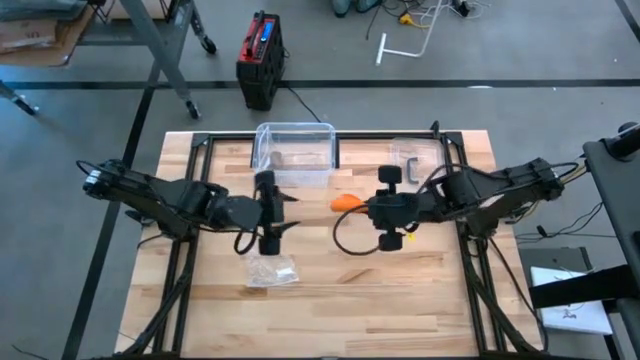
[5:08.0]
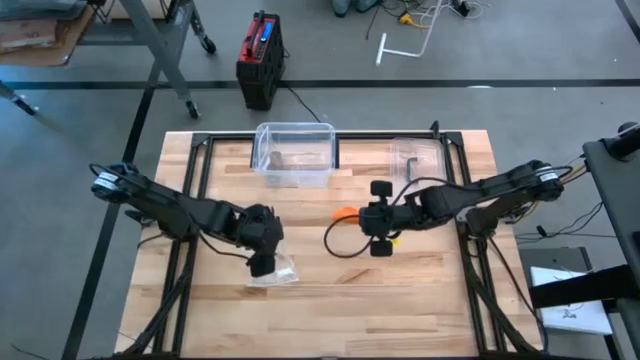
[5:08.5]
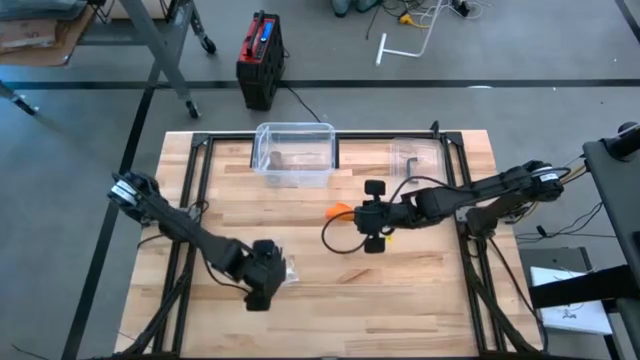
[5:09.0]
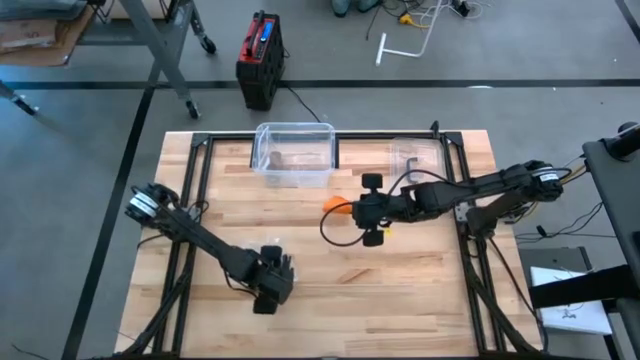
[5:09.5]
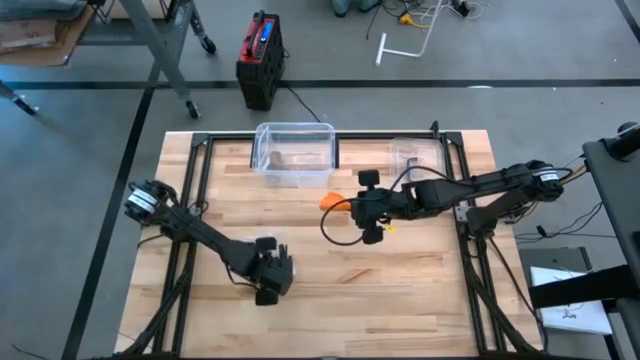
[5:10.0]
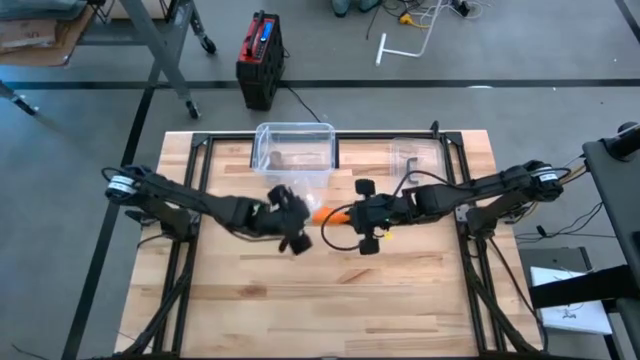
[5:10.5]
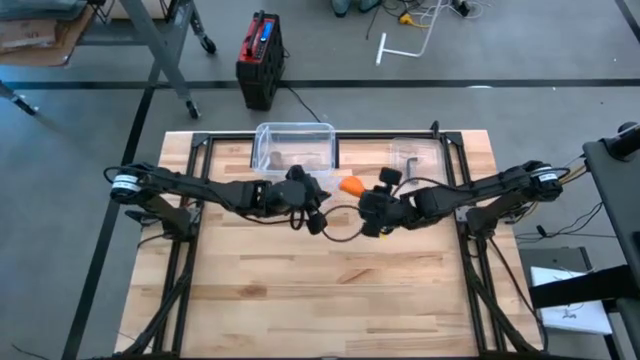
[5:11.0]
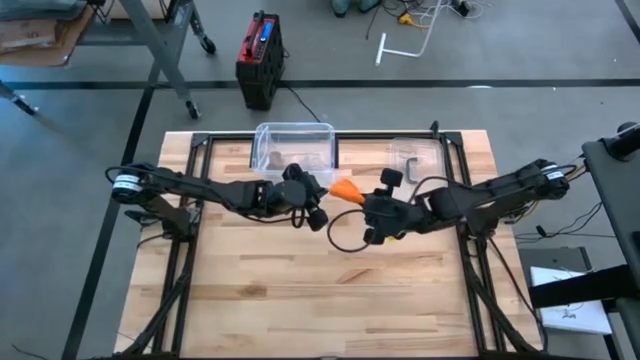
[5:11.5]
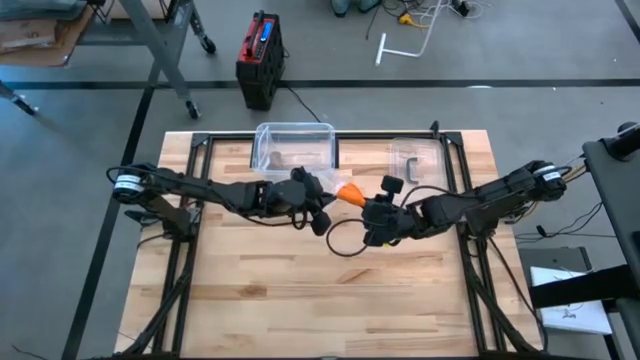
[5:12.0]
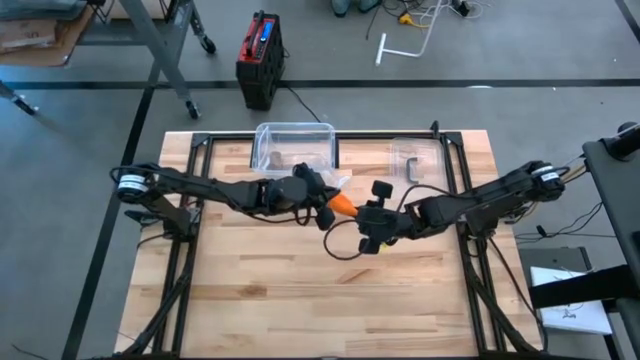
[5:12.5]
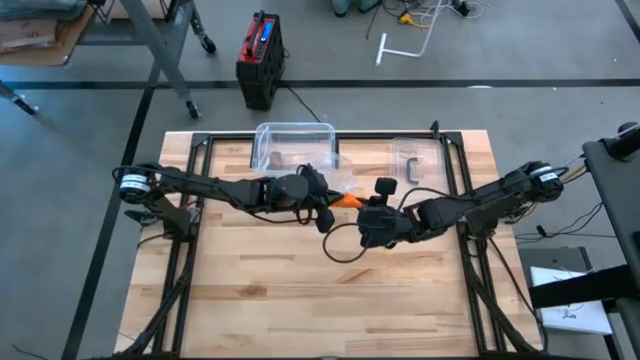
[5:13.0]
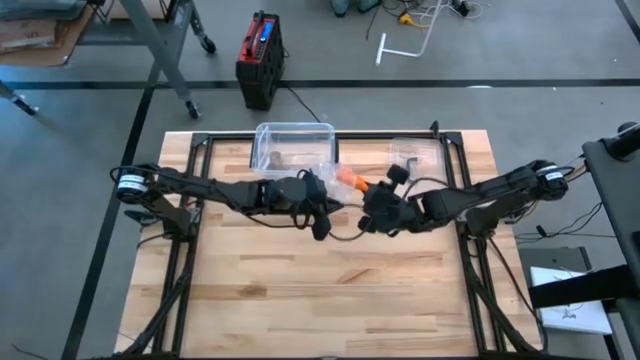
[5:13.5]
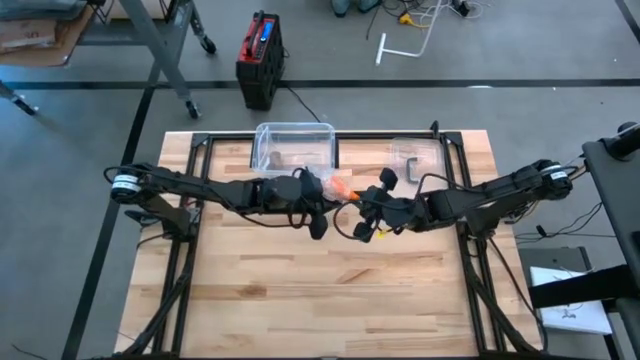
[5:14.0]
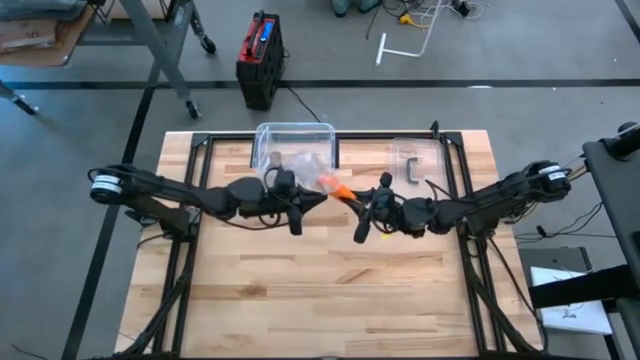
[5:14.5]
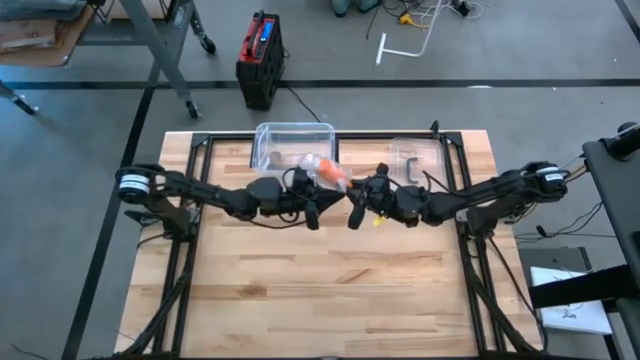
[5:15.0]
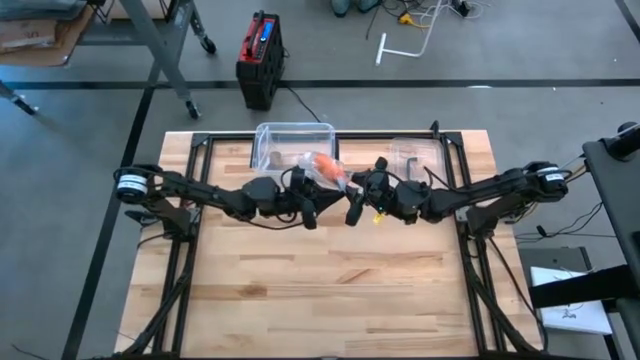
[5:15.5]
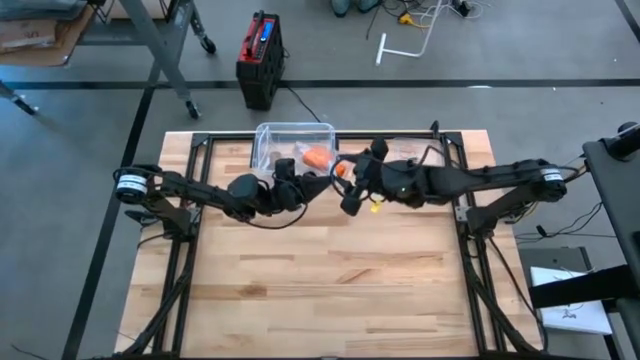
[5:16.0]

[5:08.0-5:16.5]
Task: Roll bandage
Put the orange bandage into the transparent zip bag

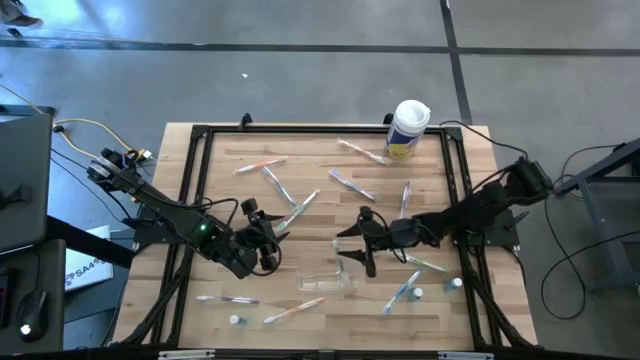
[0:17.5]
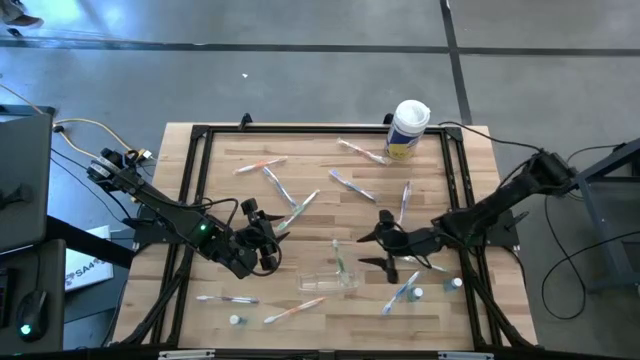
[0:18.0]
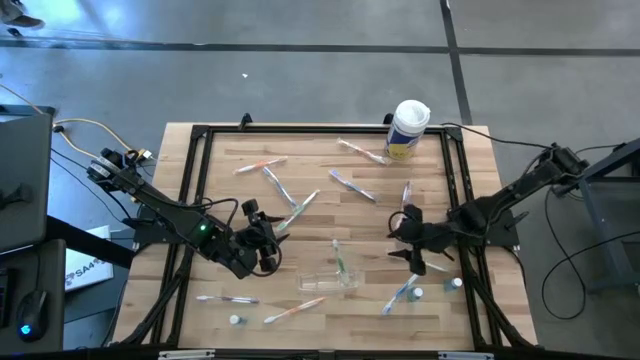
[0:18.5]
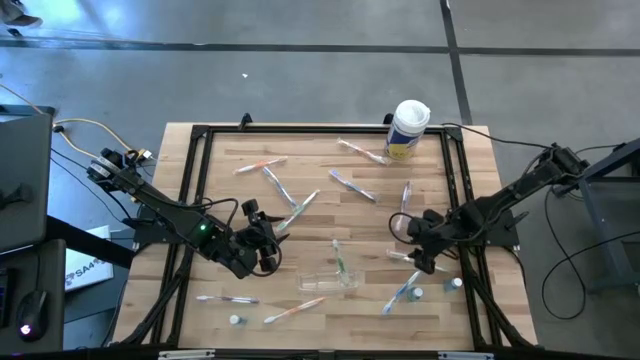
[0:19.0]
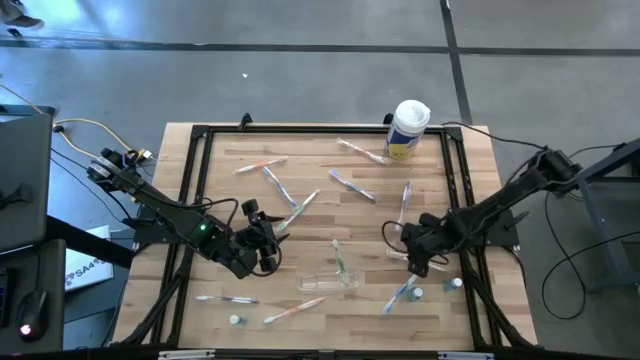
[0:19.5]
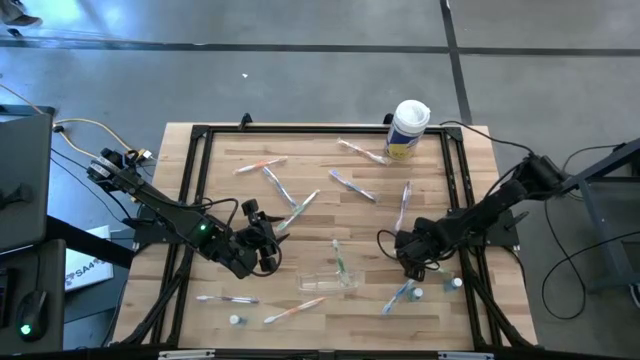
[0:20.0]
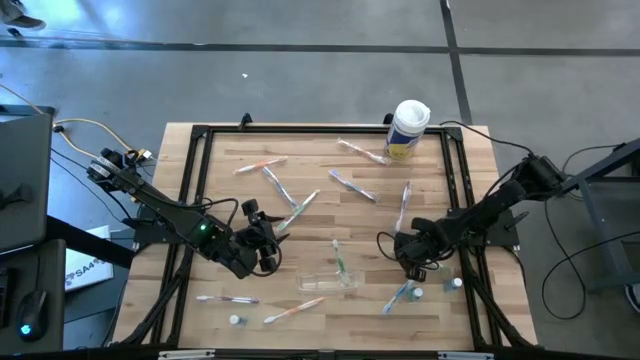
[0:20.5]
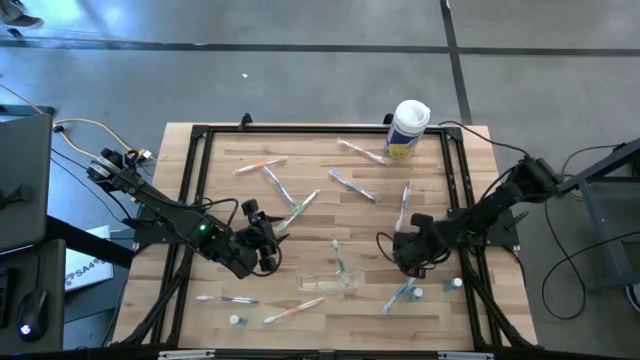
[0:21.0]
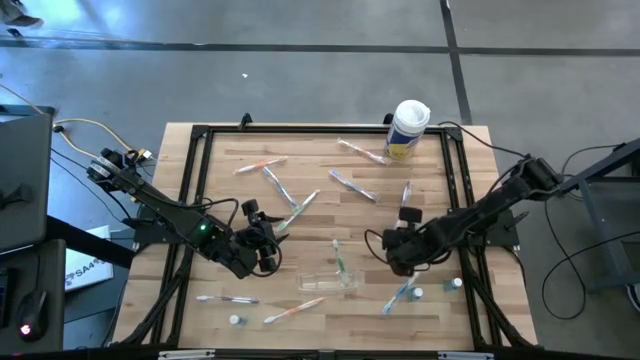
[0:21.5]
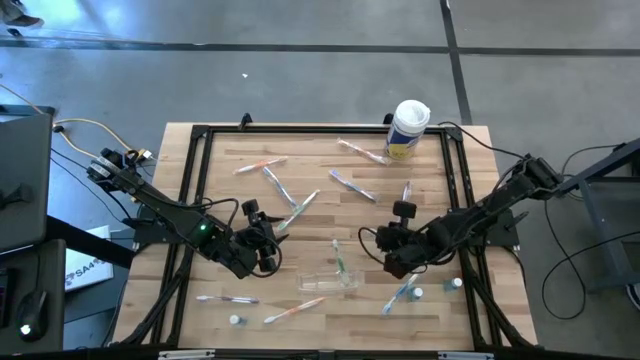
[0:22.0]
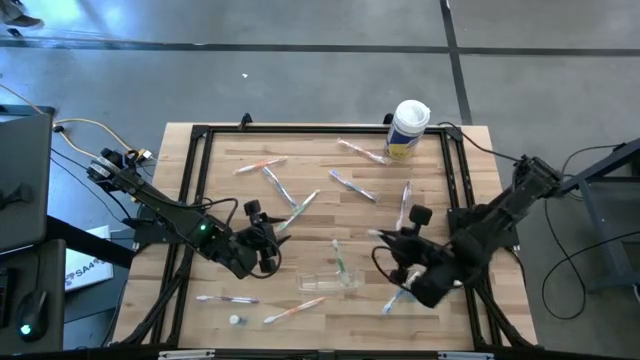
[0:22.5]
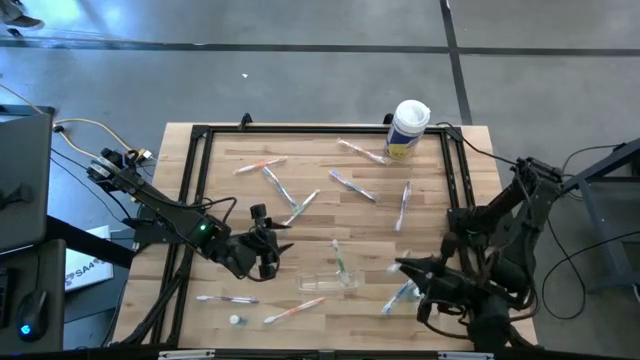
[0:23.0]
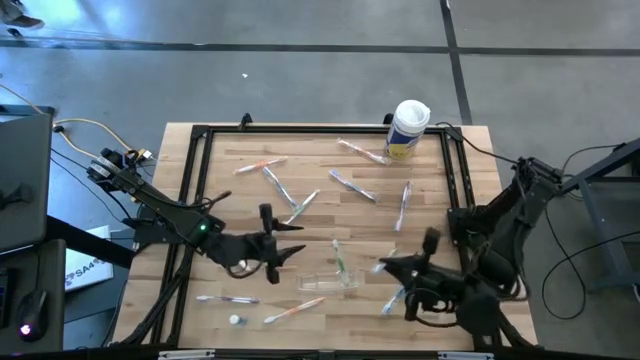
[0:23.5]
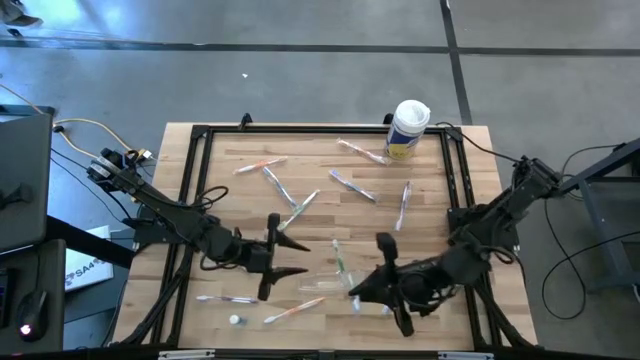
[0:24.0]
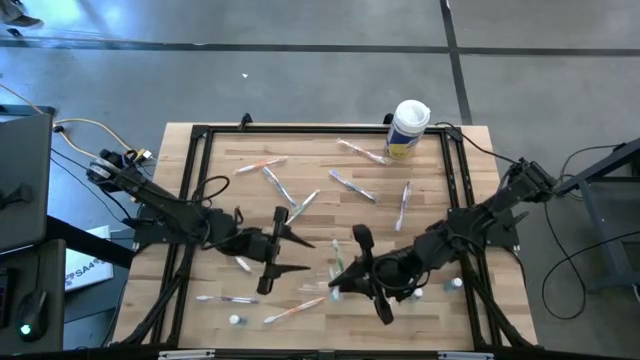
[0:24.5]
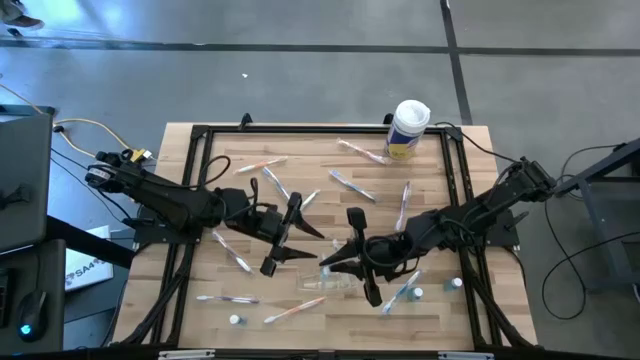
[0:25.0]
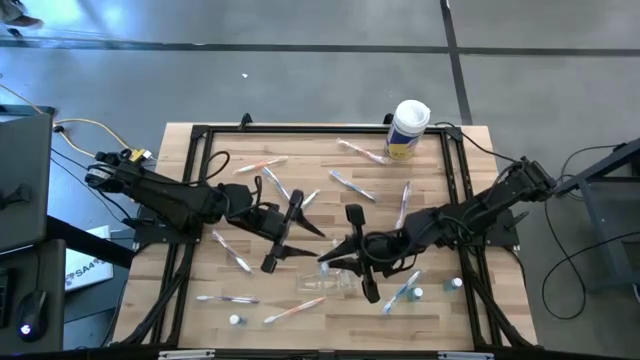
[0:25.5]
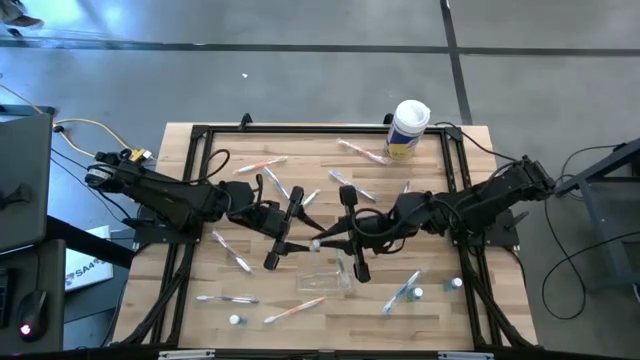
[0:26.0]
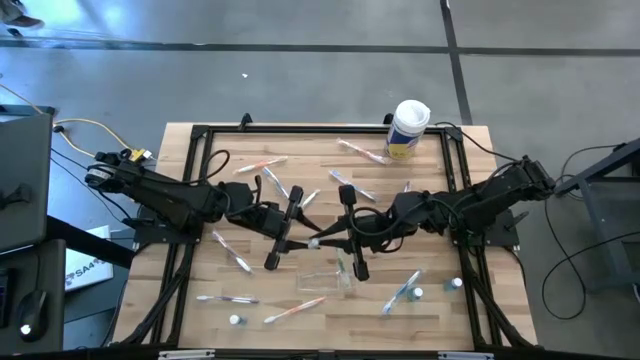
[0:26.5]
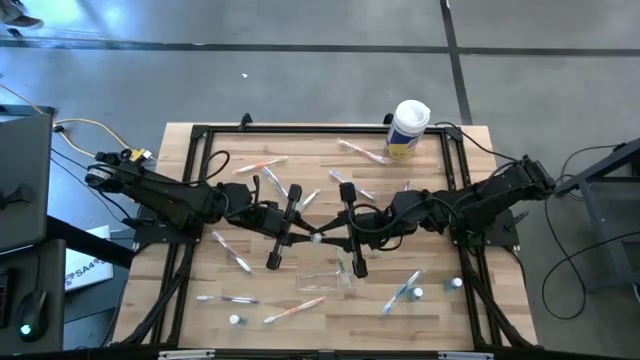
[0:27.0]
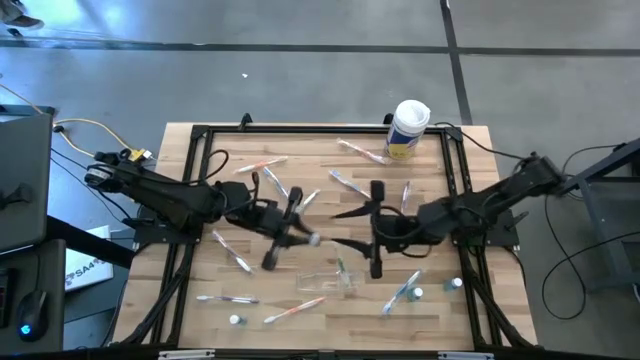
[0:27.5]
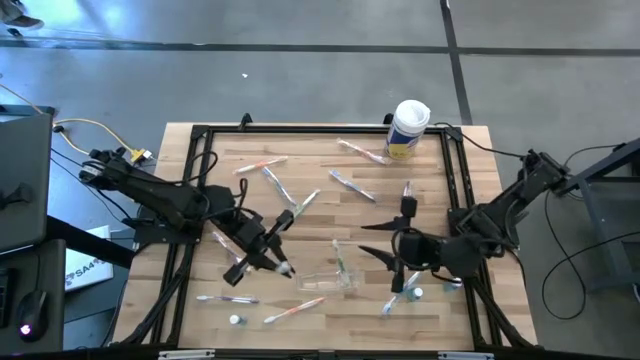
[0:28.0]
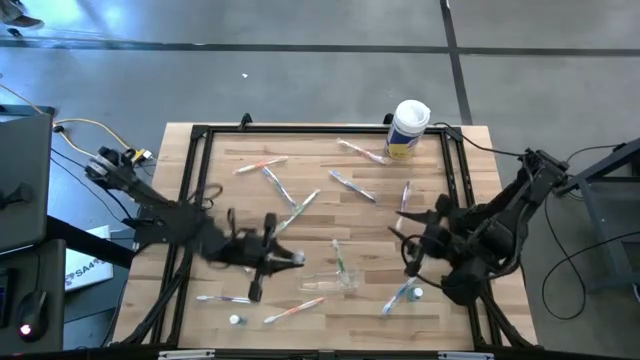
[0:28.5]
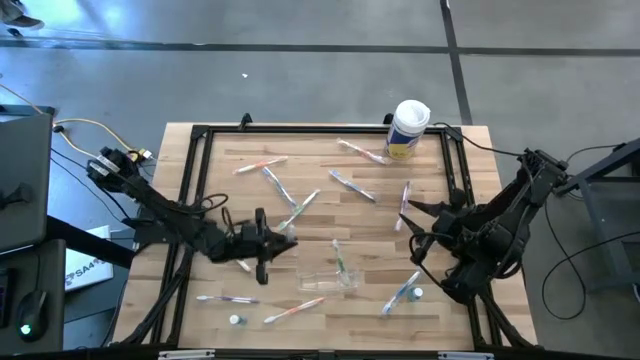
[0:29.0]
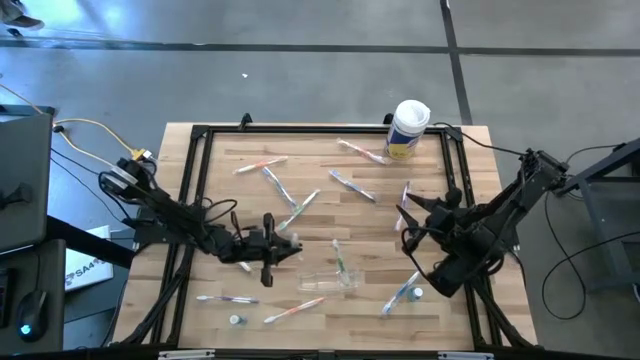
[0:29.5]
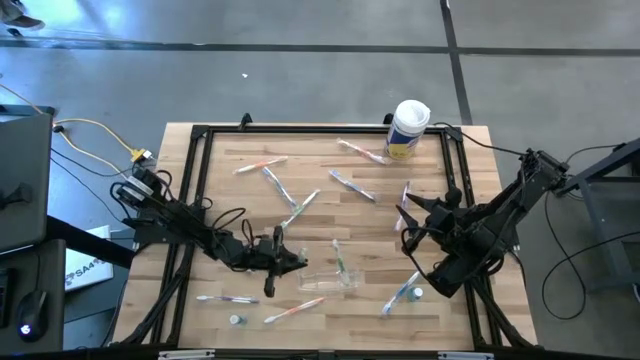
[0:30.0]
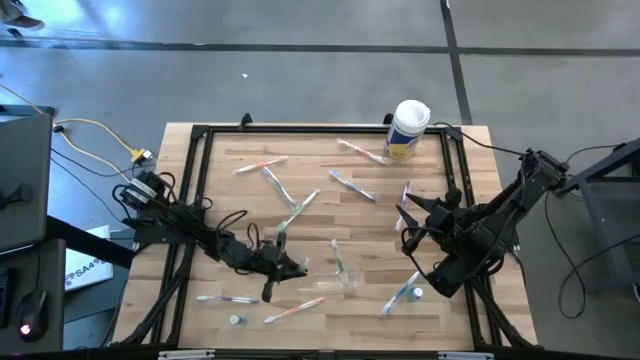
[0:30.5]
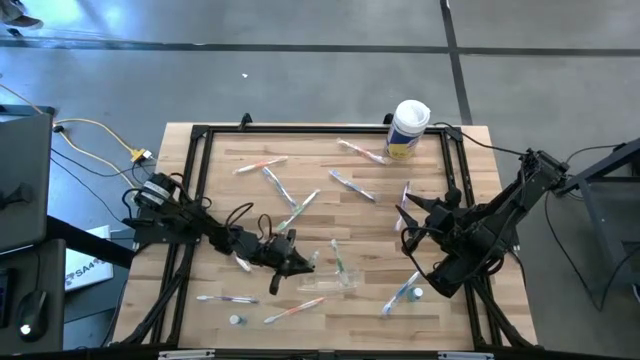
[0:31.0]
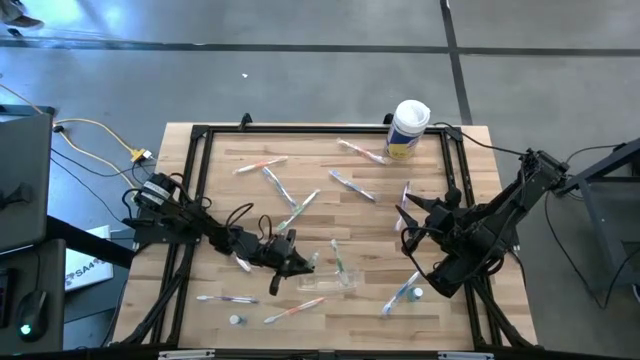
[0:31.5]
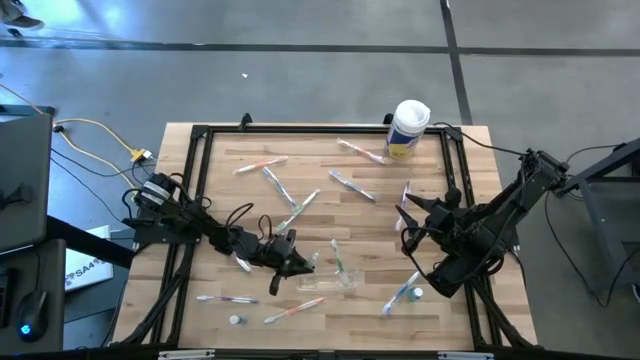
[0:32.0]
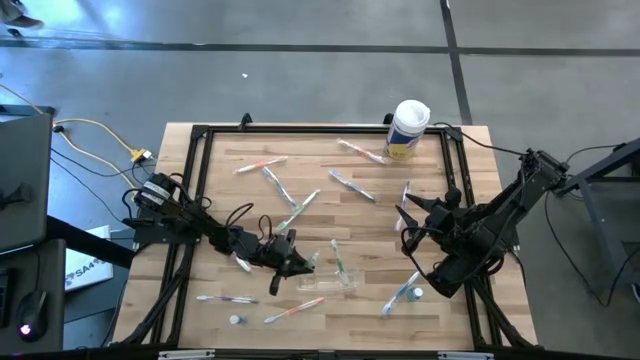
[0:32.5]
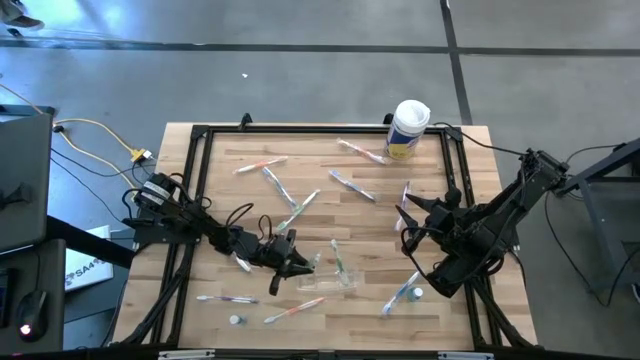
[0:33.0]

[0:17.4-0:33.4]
Task: Pick & Place toothbrushing station
Put the right green toothbrush into the transparent organizer
